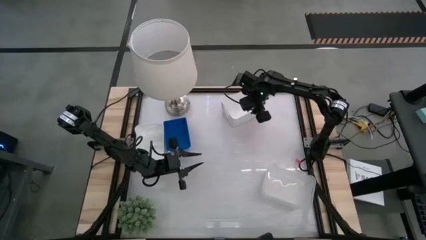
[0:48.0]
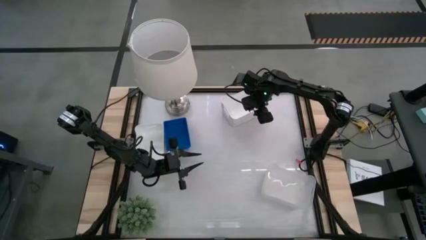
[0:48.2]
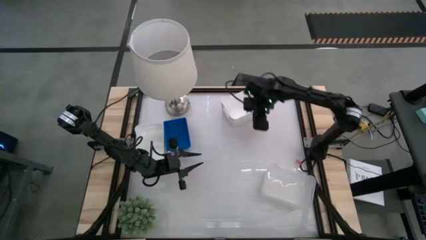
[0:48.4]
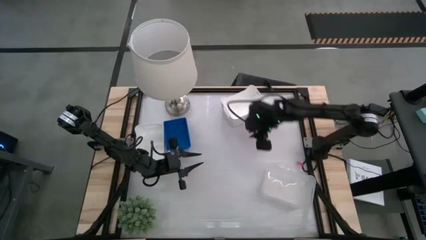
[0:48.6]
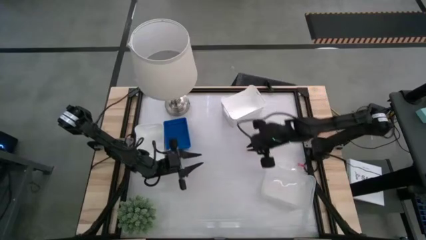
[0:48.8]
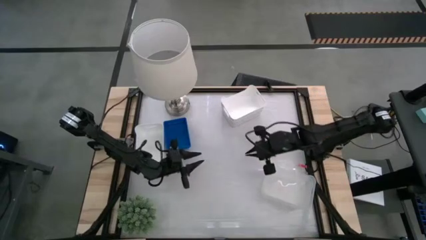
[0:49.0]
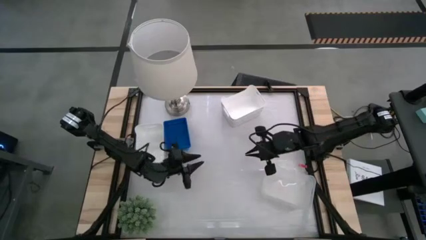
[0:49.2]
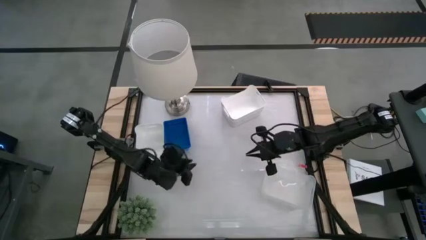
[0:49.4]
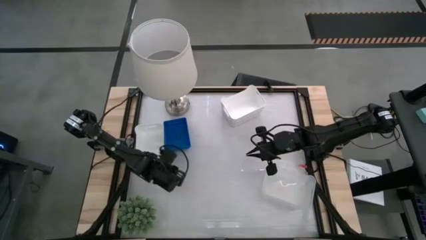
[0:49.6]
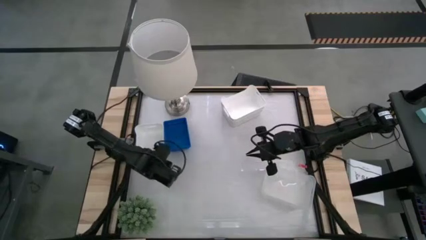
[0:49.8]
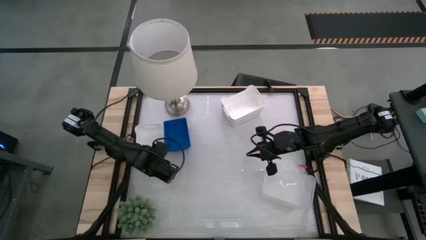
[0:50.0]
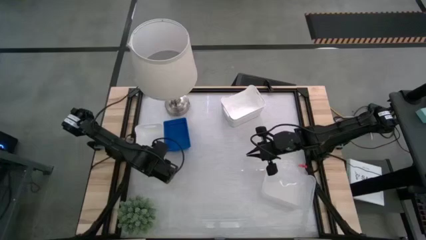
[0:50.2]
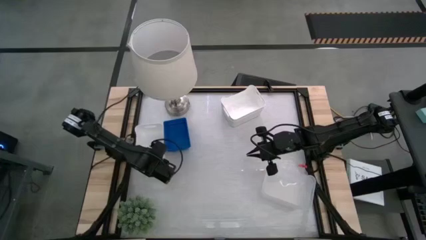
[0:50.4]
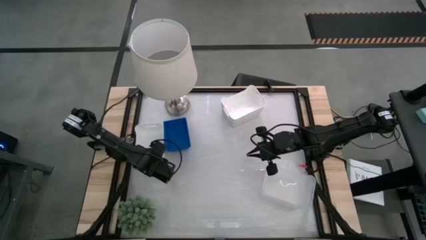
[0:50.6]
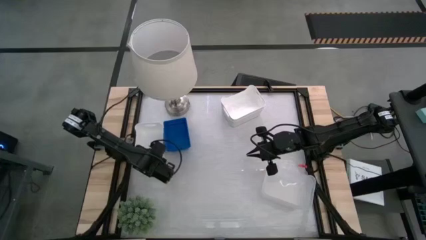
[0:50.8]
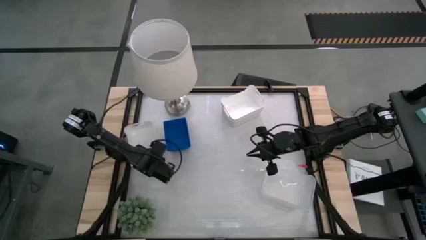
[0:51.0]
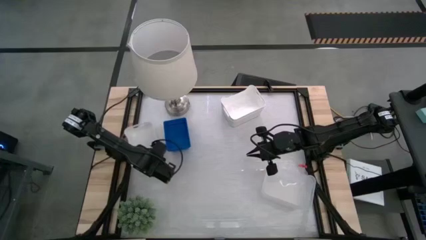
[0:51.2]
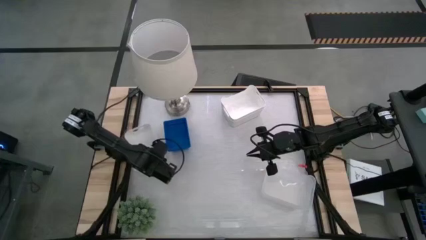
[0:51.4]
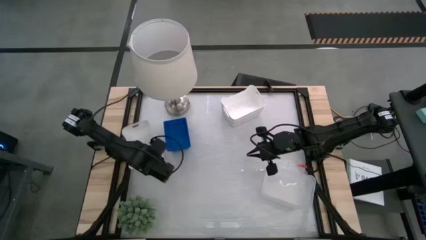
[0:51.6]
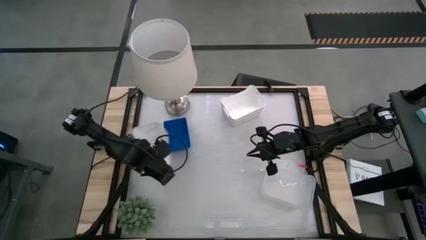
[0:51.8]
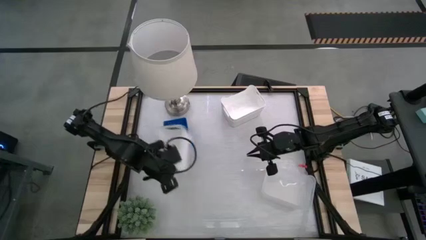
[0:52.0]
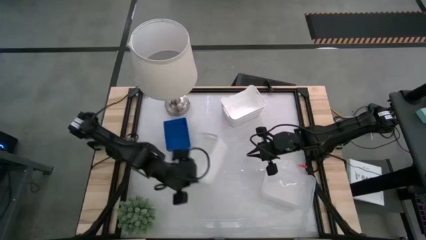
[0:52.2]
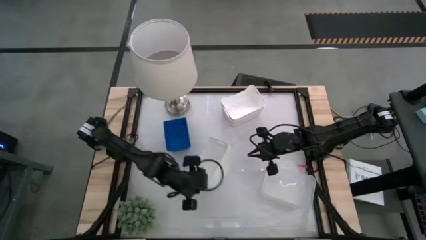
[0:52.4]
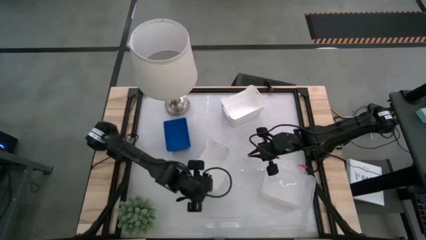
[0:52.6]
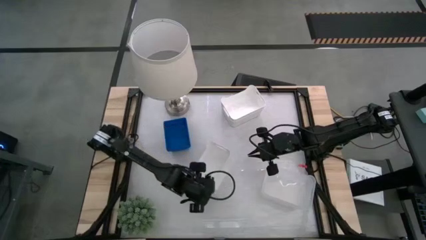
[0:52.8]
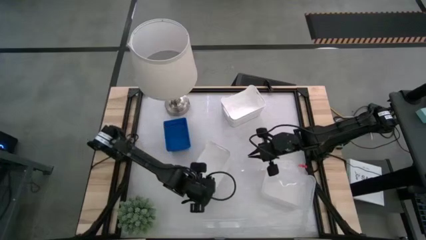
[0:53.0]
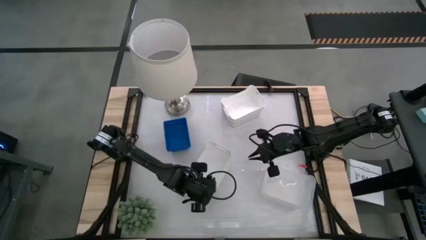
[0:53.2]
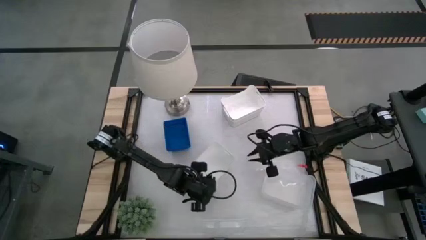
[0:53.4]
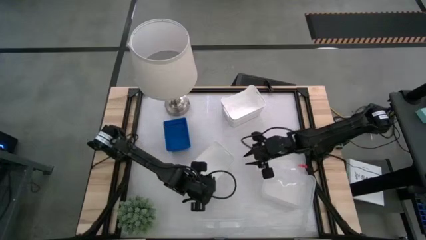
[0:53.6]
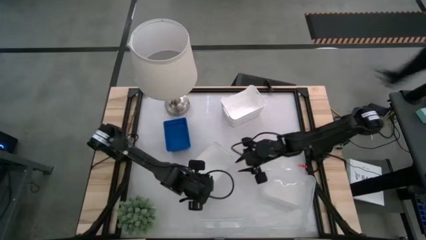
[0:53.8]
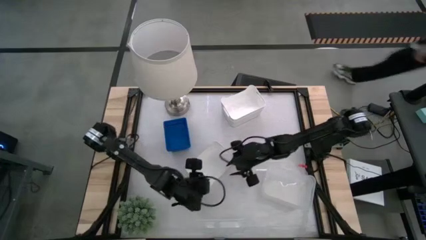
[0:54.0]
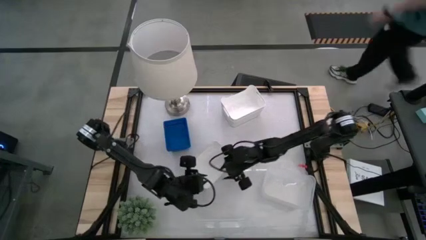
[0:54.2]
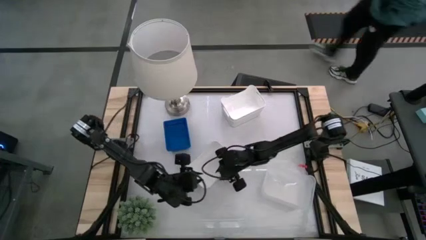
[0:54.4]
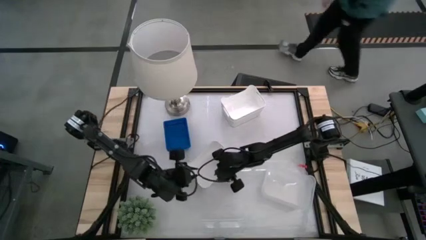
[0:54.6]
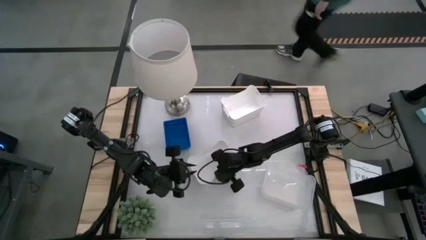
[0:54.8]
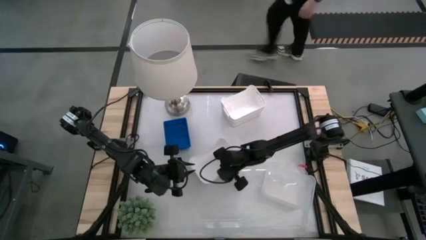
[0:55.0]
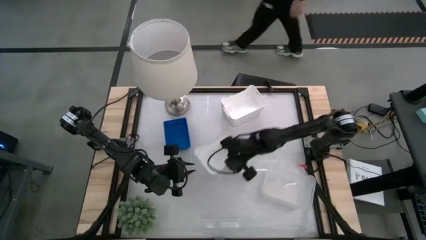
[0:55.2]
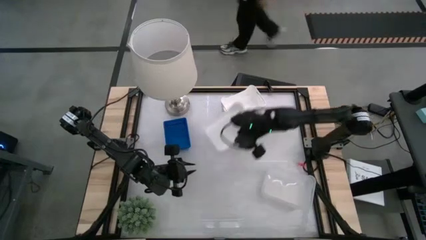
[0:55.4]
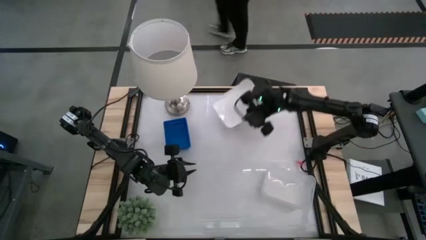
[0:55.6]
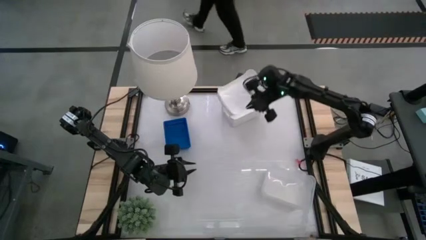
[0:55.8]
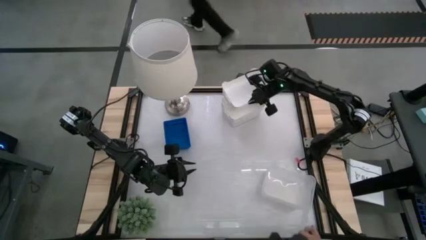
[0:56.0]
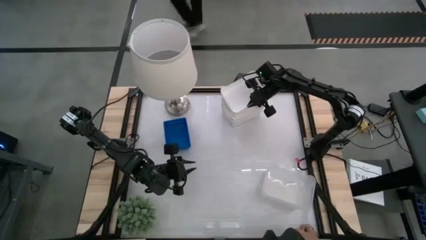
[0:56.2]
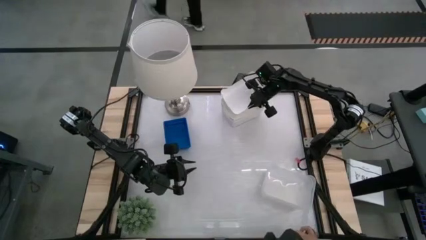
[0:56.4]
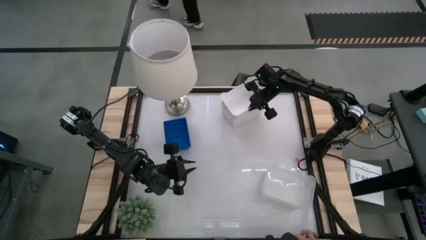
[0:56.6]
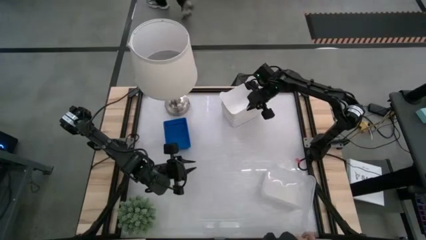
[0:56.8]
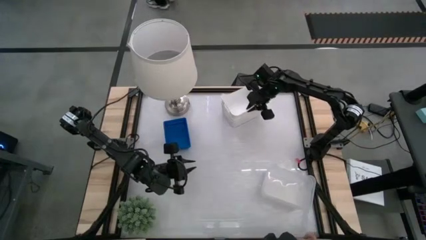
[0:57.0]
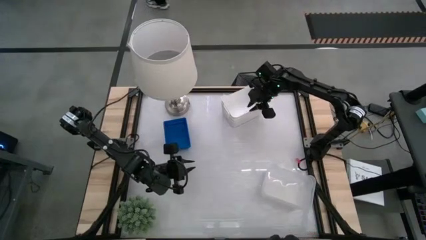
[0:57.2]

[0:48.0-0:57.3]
Stack the bottom white bin on top of the top white bin

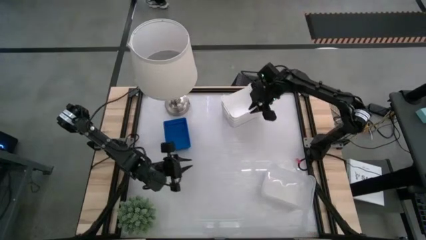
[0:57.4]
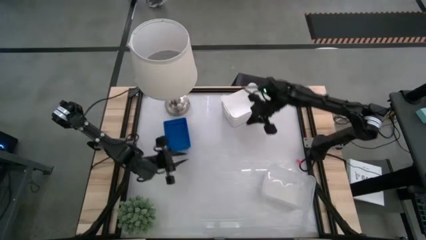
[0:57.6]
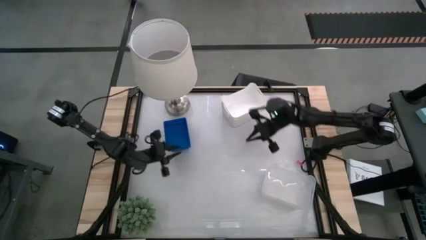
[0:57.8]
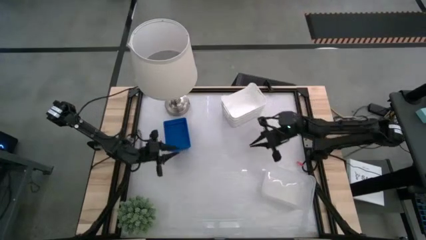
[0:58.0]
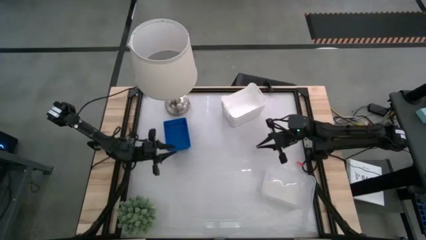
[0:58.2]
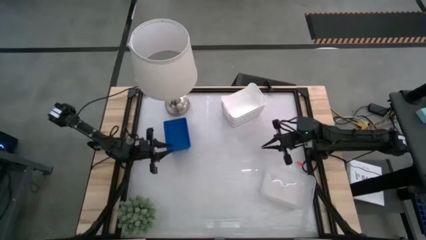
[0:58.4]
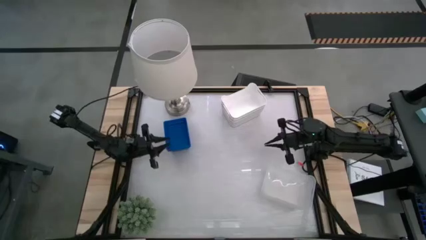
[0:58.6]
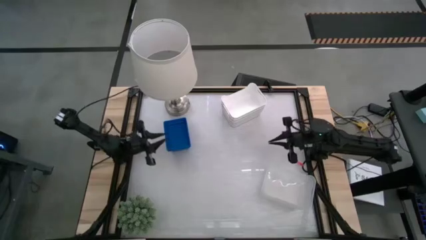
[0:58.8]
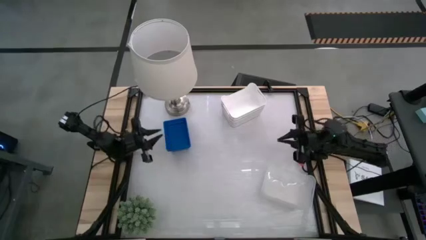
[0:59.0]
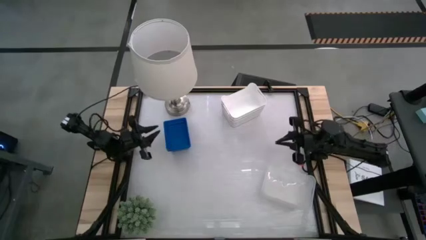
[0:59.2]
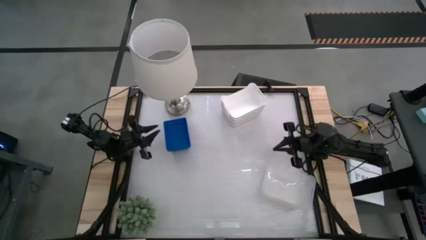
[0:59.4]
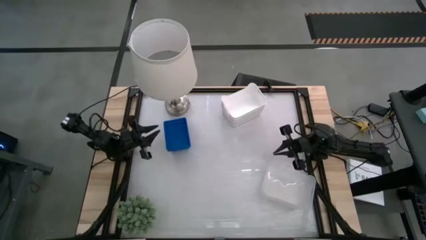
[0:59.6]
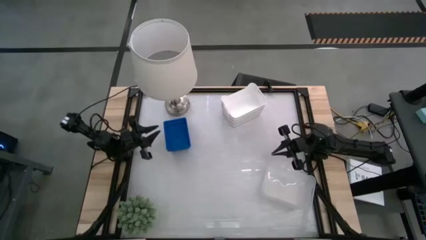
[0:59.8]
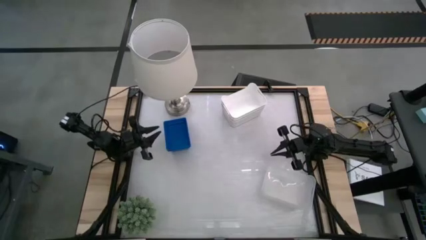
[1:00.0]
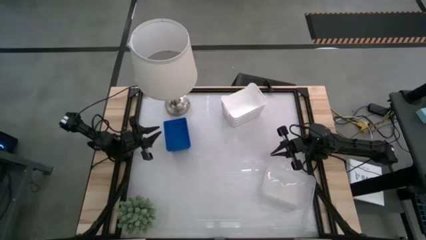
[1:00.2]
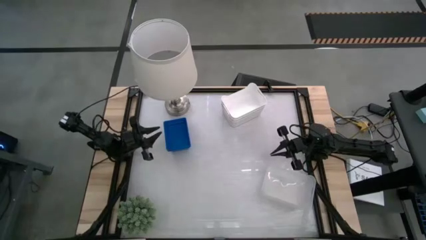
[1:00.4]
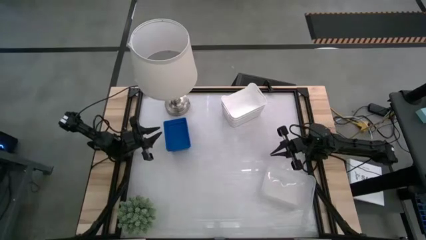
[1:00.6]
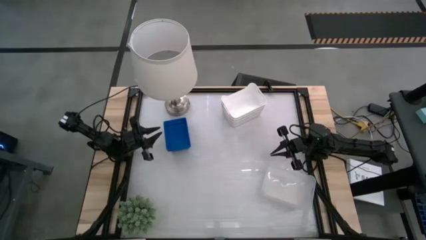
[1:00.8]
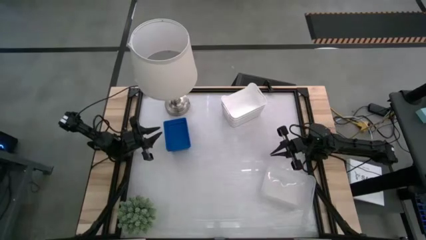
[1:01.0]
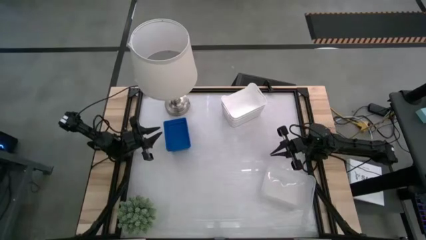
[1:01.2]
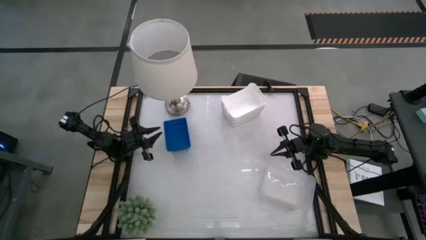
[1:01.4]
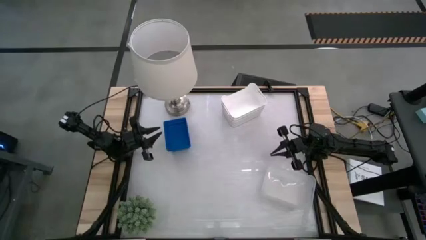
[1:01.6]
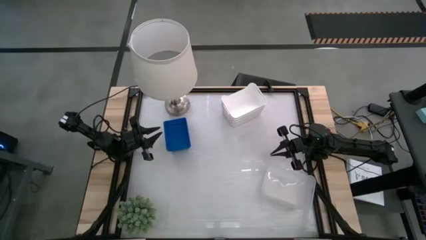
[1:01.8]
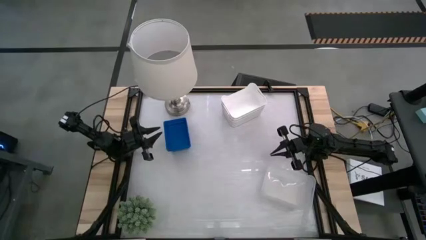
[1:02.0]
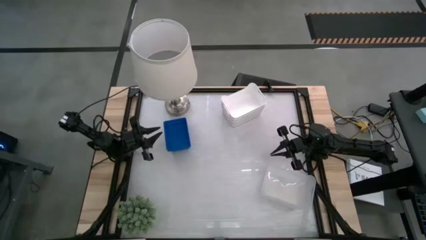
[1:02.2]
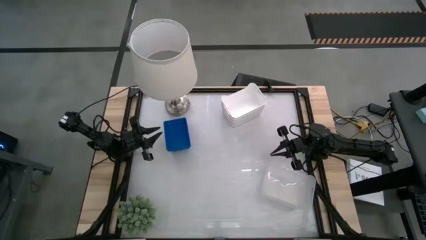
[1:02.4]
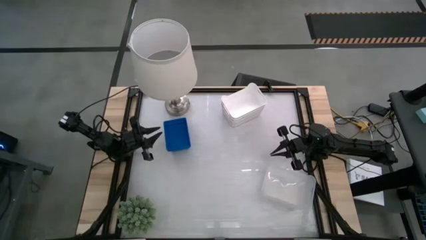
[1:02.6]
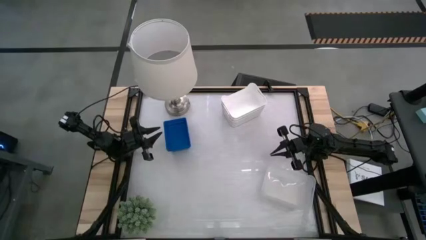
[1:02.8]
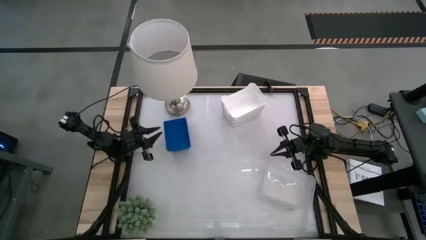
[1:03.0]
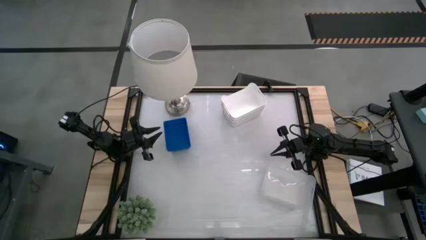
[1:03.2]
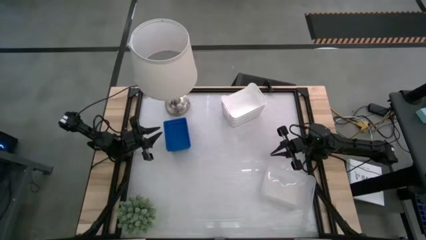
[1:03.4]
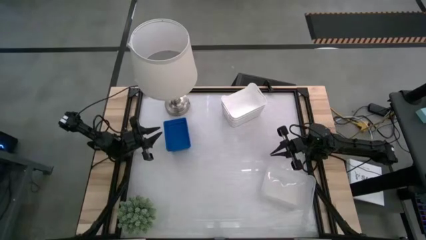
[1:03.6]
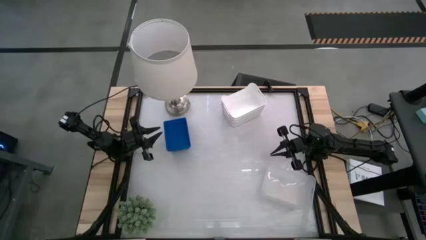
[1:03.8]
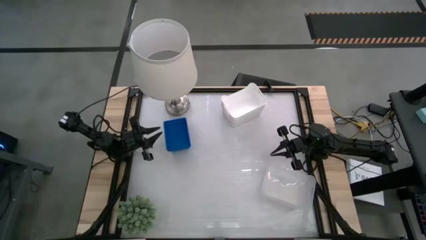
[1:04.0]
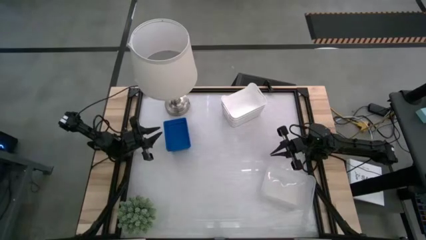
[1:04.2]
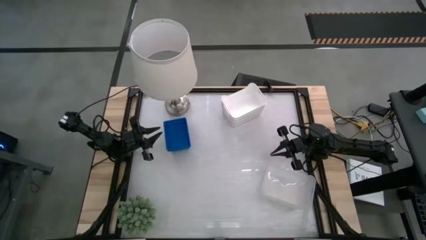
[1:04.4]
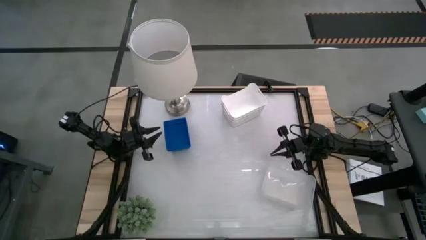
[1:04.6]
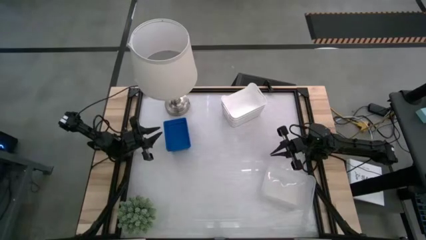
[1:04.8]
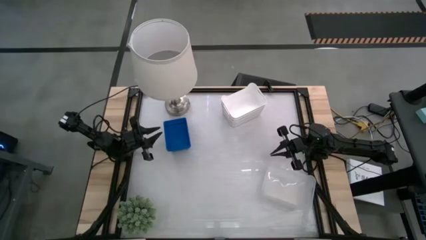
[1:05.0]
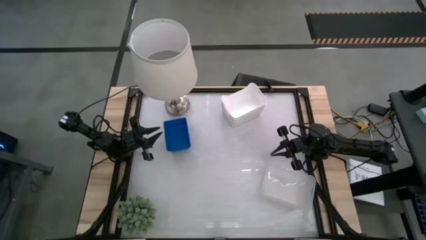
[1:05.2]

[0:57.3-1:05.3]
Return to Home Position
